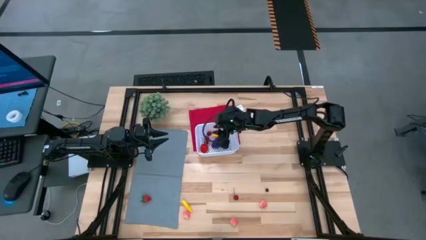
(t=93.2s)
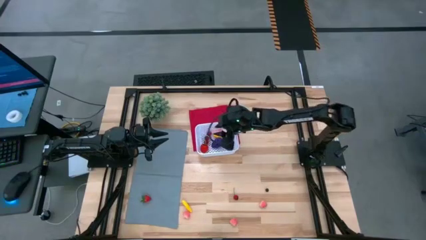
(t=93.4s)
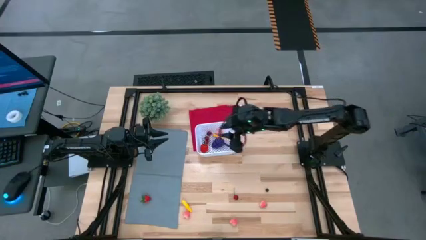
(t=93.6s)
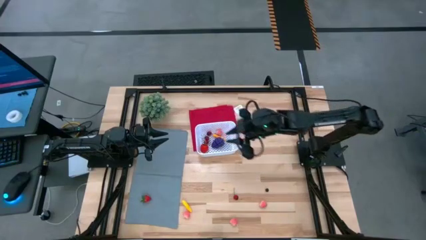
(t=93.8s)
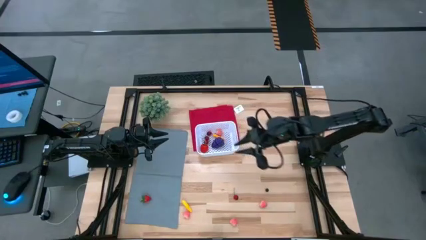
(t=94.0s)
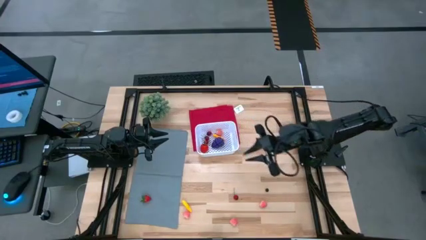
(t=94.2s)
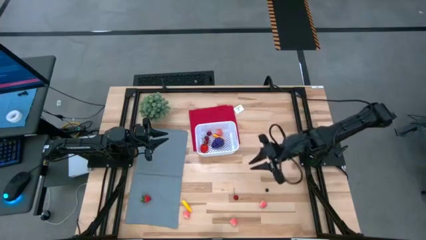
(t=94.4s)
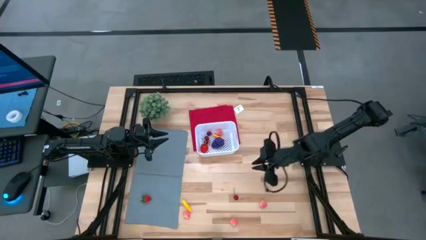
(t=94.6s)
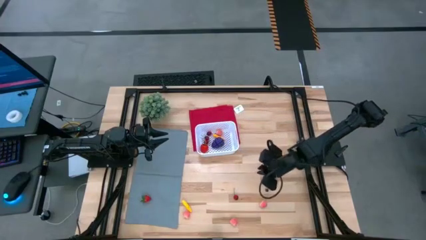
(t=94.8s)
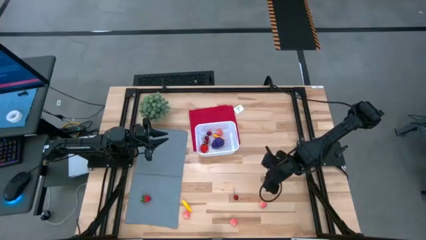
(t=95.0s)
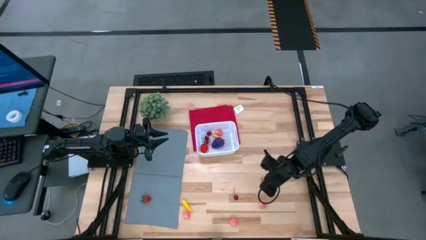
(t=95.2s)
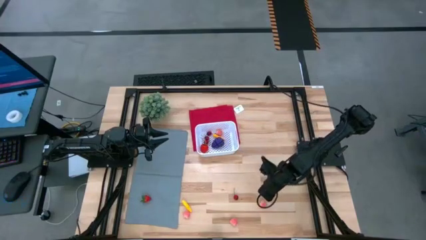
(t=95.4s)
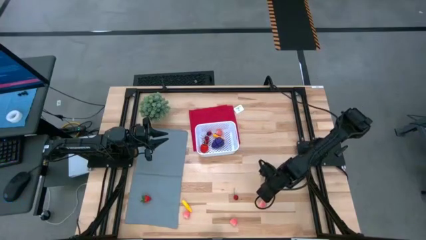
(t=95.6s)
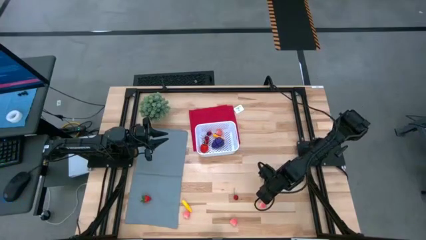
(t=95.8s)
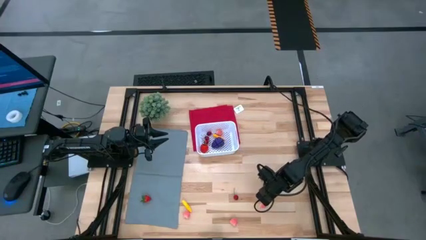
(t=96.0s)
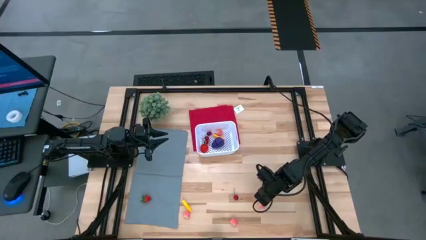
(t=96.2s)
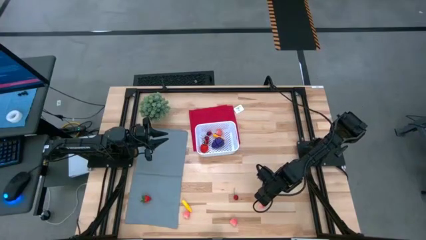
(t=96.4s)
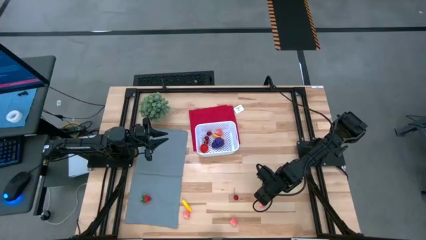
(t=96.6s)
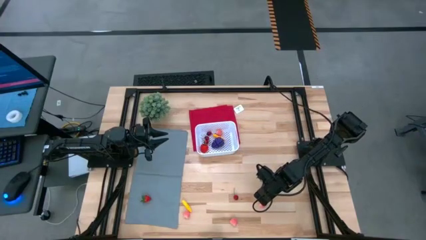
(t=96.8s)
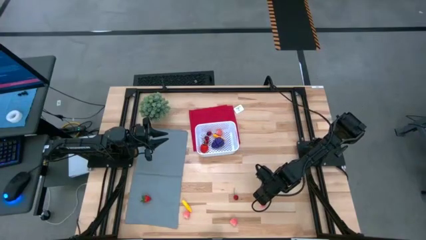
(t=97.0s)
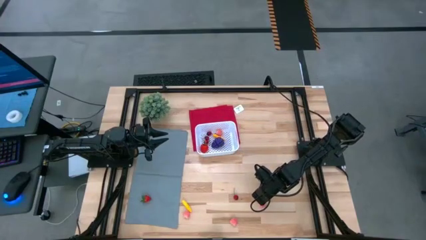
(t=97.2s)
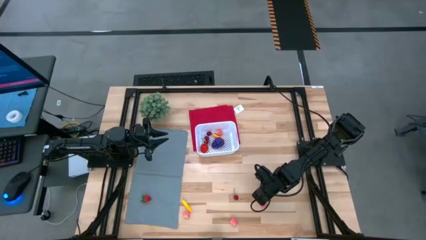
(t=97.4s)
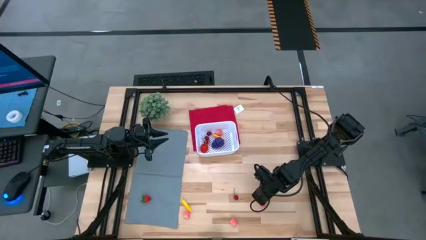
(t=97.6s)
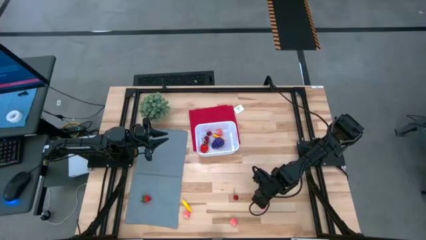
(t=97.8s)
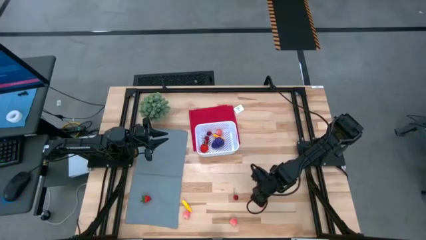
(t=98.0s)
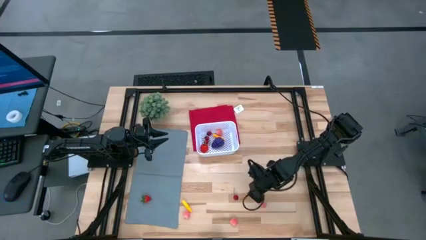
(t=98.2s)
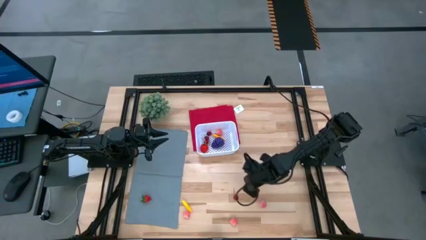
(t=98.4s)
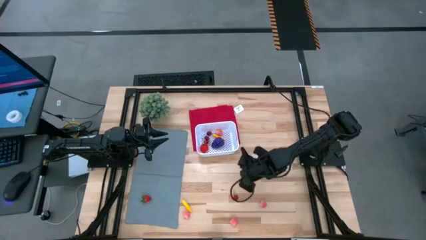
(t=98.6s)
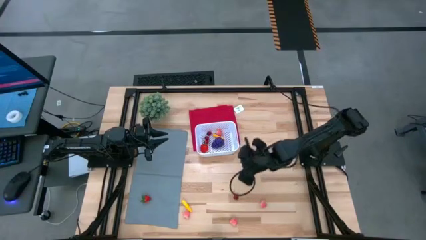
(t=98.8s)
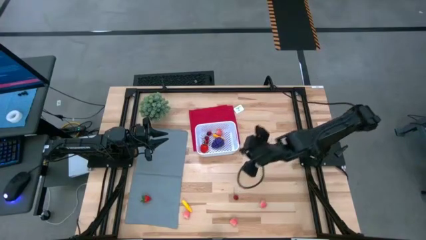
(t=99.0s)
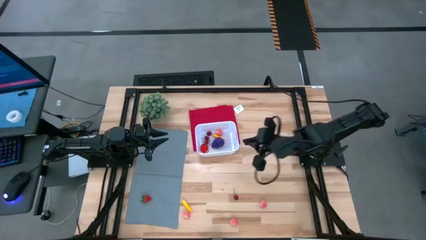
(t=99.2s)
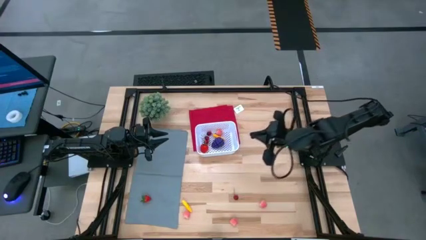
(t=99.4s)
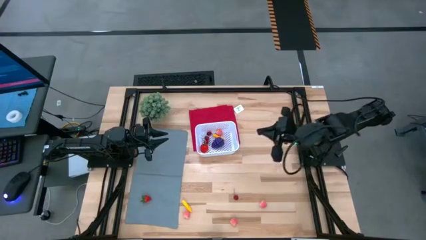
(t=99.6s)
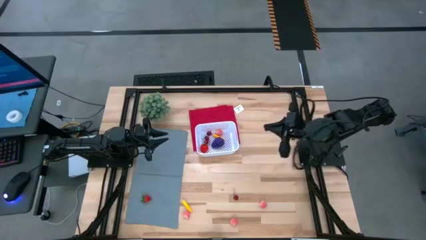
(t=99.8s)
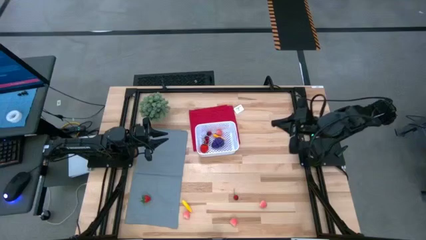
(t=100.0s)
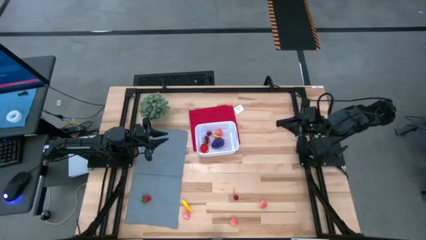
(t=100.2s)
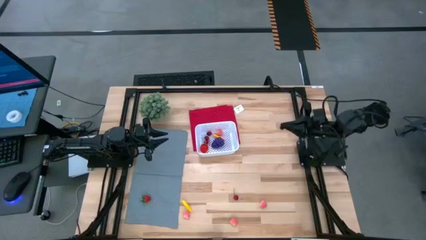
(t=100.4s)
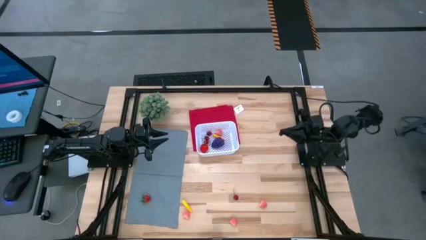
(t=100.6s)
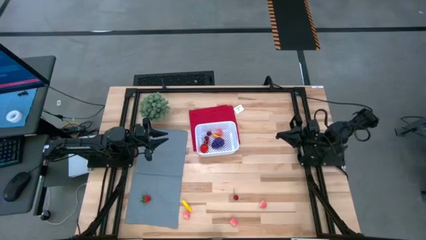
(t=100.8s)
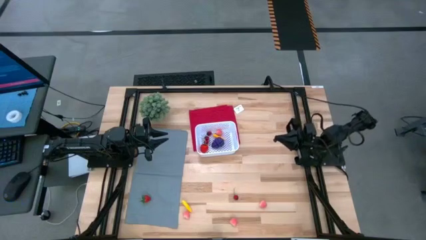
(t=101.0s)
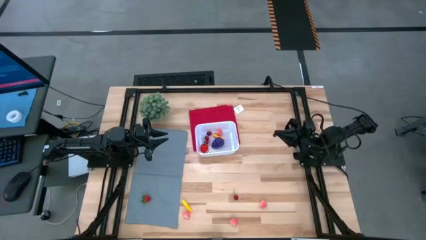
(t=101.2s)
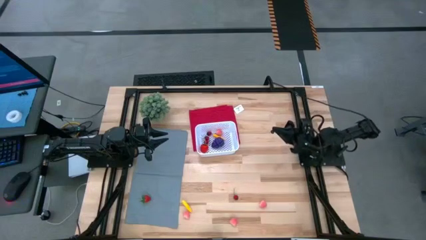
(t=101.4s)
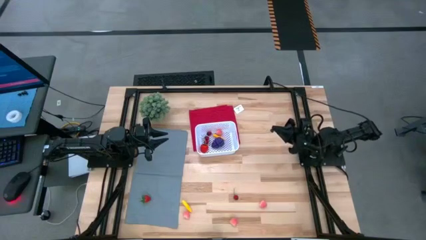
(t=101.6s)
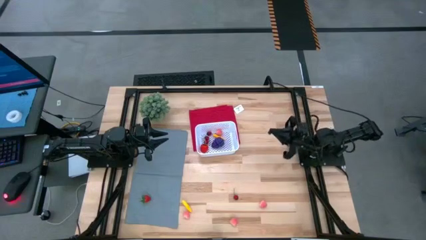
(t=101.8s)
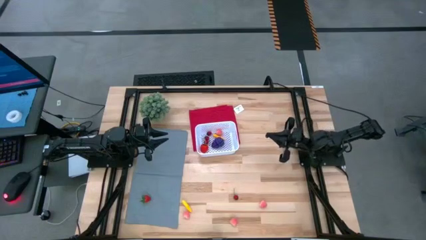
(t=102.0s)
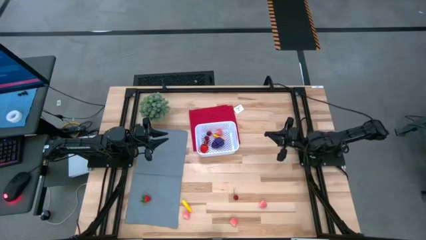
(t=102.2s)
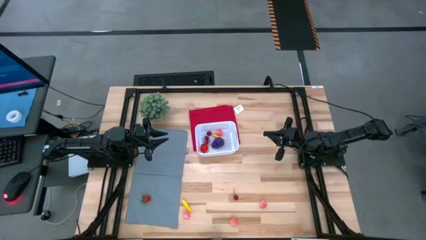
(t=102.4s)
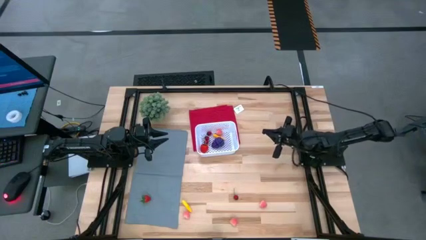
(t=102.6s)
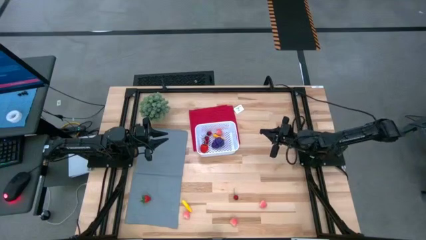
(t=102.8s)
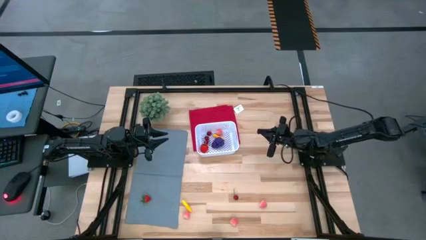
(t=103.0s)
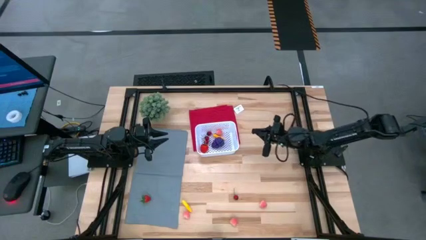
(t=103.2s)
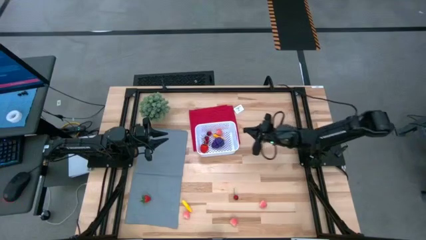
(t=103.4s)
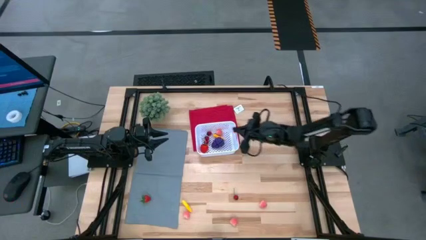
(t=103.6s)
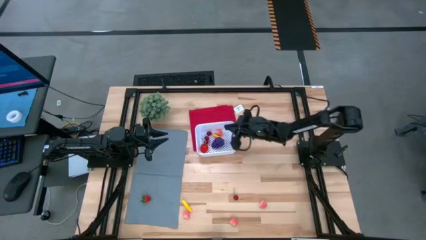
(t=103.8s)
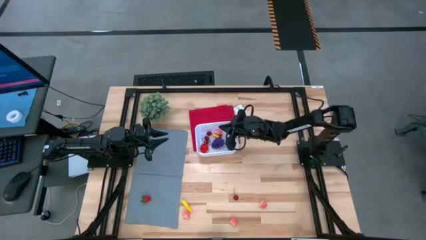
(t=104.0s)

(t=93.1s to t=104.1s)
Task: Pick and placing Produce into tupperware
Put the blueberry into the white bin
